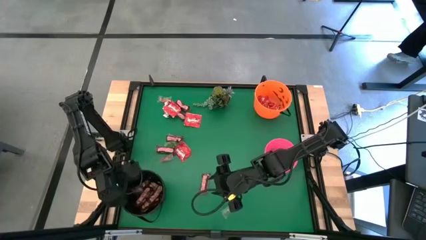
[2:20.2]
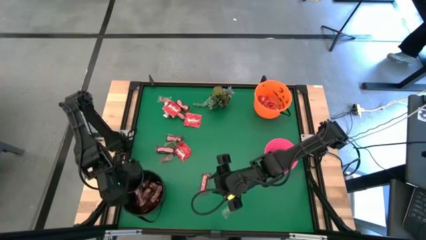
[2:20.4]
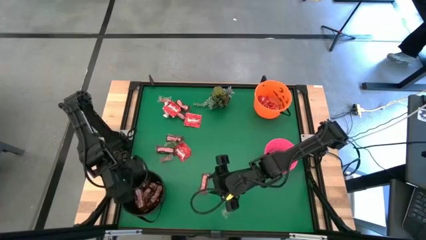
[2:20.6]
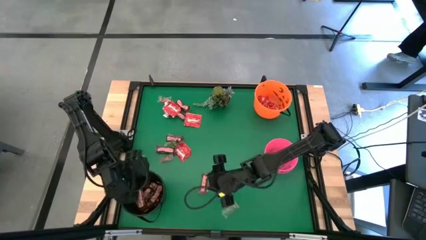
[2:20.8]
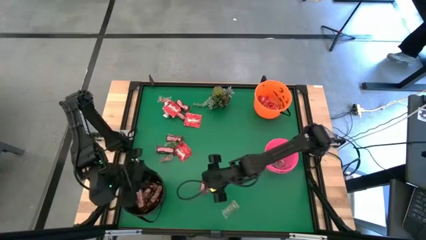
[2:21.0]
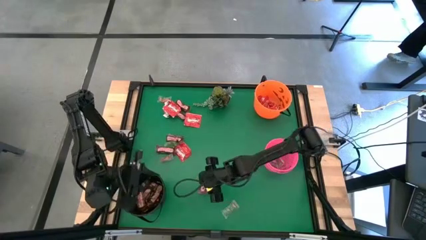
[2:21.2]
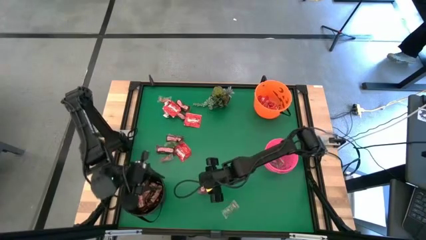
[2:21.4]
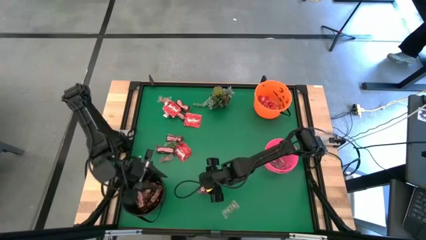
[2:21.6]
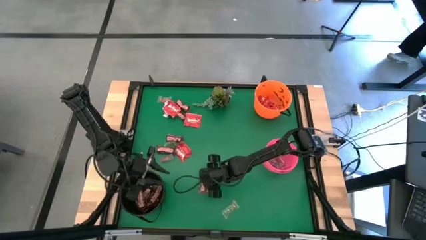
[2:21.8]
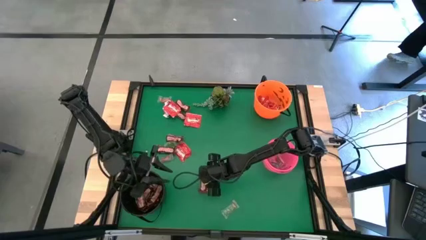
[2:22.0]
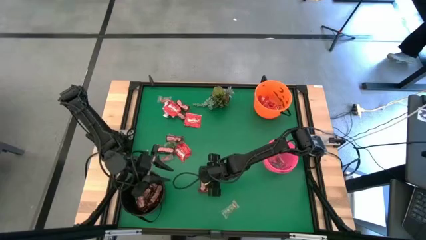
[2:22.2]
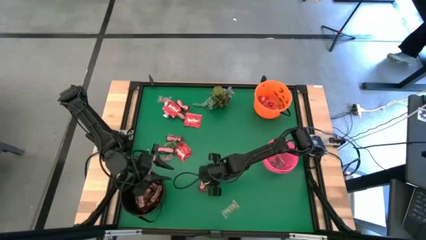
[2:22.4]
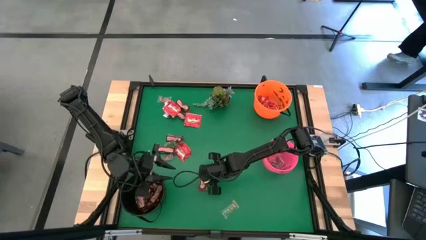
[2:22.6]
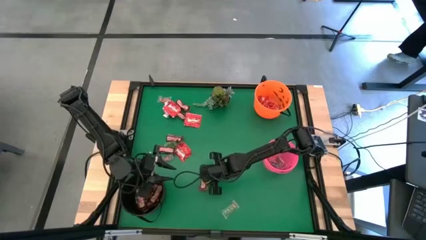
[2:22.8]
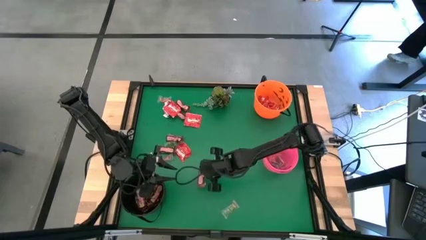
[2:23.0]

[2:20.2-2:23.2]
Task: Sort candy
Put the brown chocolate bar into the black bucket

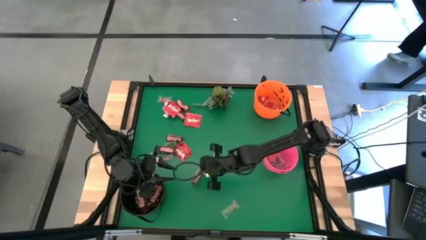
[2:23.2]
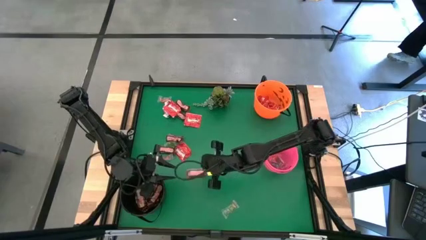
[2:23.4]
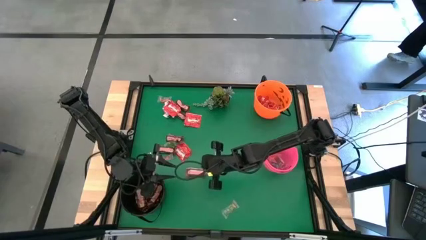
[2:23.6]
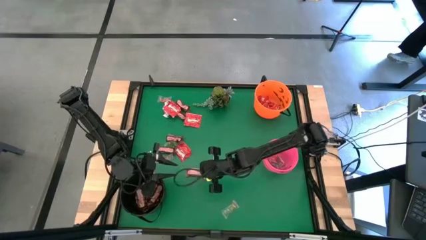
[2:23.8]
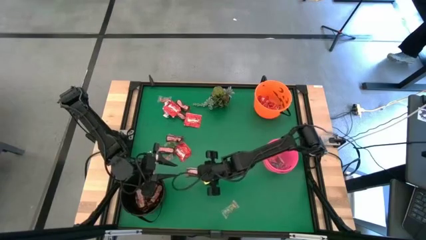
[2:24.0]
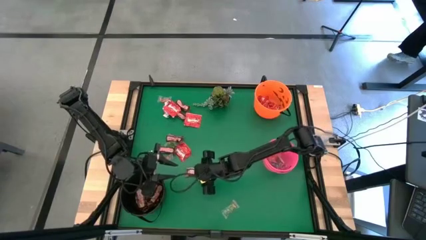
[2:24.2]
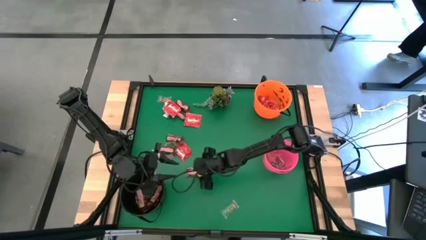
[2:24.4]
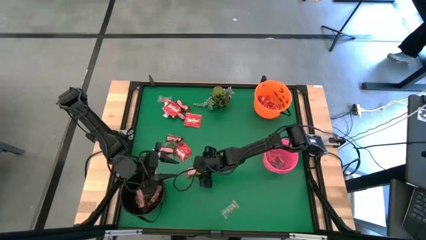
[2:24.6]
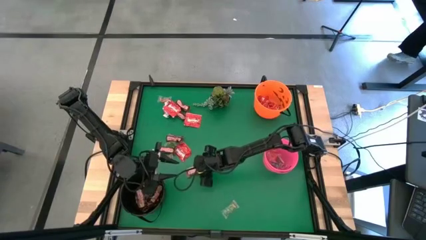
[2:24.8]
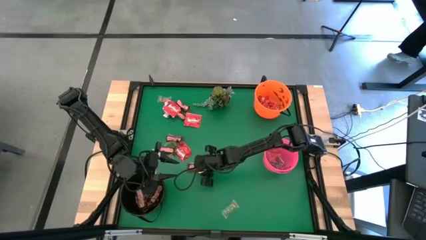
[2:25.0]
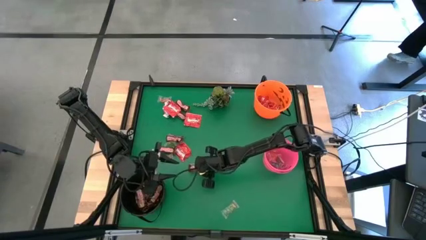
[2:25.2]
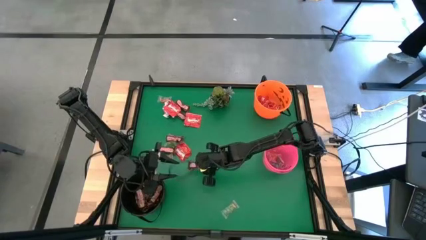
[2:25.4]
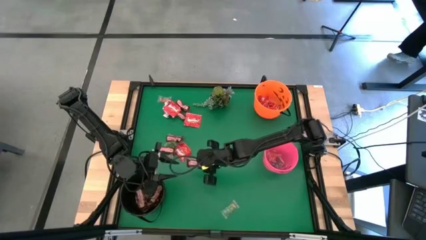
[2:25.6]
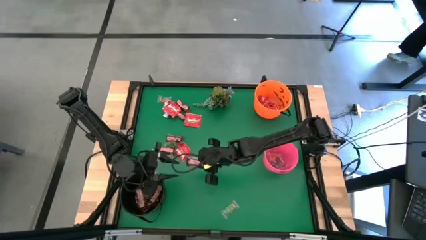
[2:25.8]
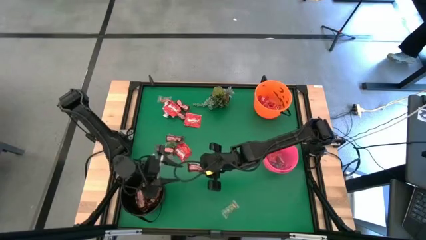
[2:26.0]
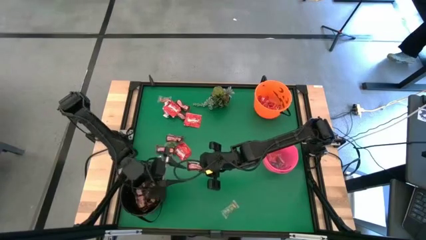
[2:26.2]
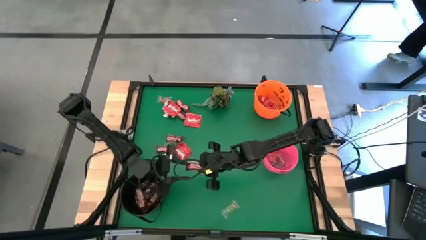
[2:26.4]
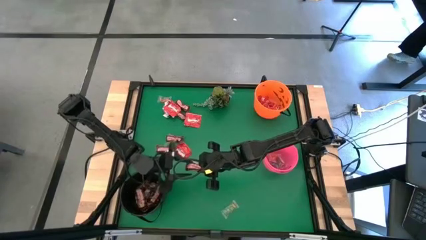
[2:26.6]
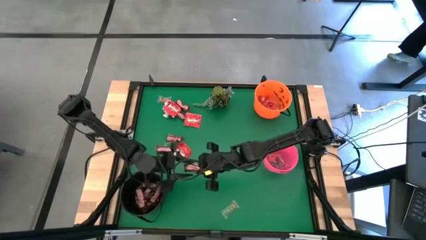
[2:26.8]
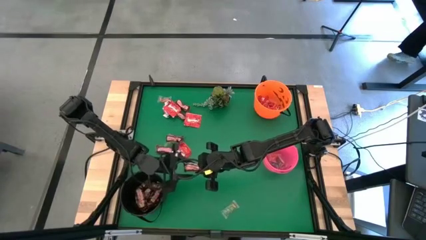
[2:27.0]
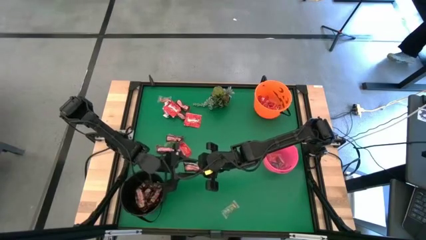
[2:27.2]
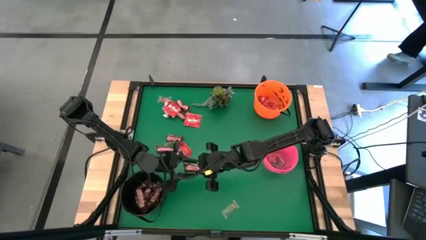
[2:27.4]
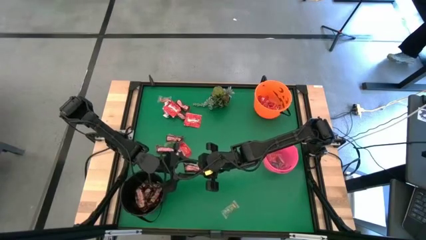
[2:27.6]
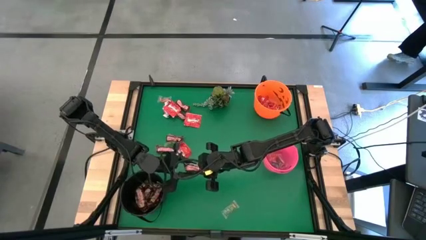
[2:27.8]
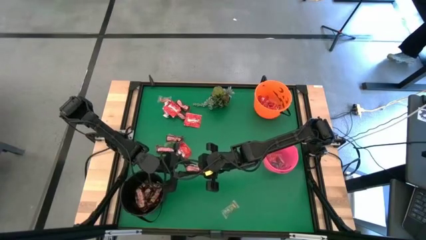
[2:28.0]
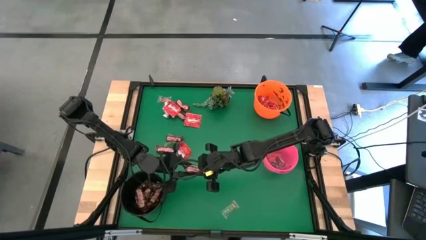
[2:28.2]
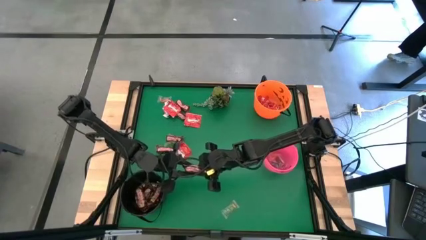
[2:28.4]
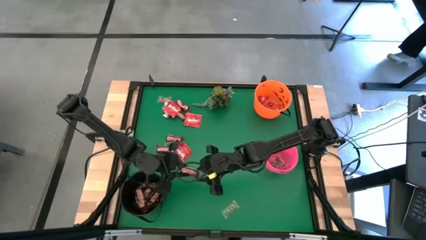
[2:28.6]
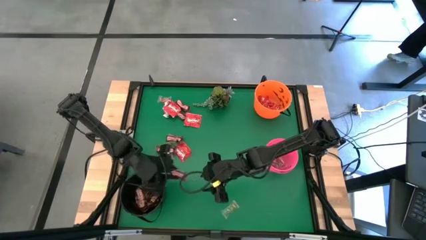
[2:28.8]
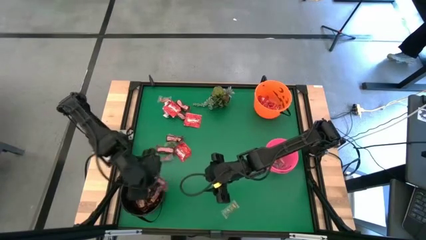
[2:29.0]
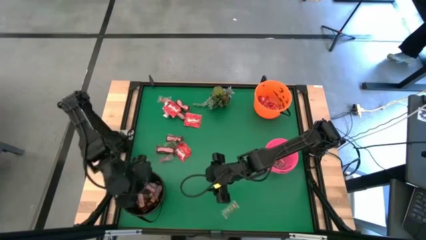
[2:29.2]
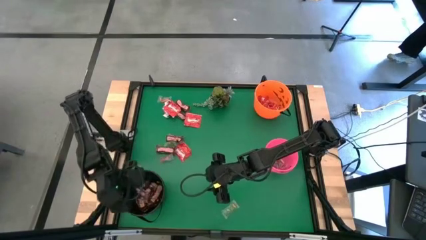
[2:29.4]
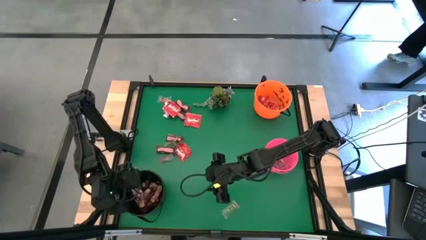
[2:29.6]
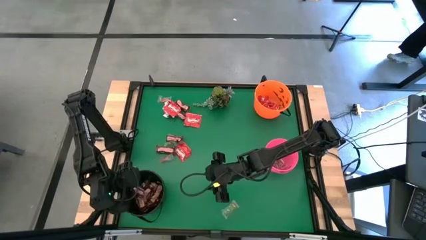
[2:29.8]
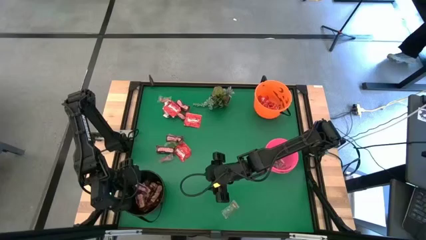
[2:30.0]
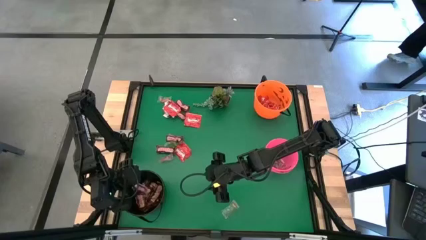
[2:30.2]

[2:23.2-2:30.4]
Put the brown chocolate bar into the black bucket

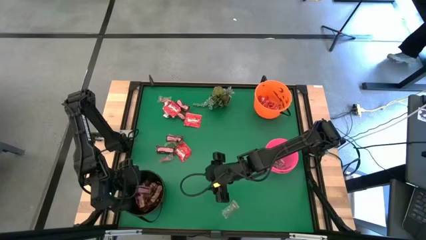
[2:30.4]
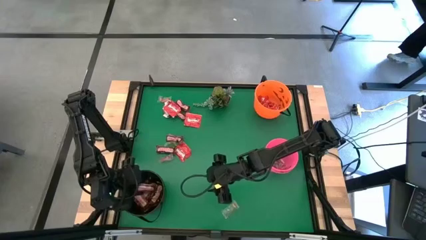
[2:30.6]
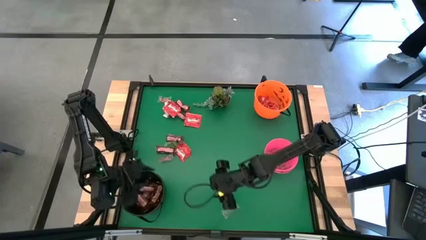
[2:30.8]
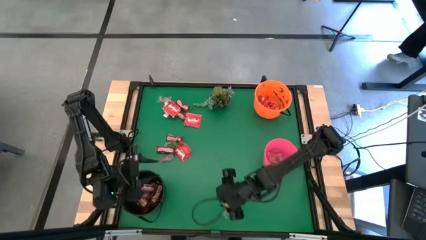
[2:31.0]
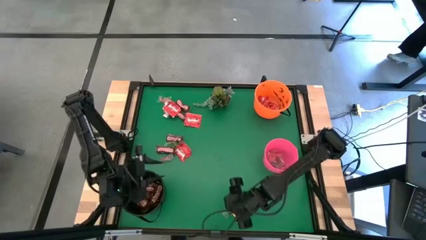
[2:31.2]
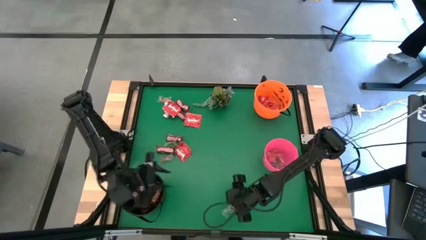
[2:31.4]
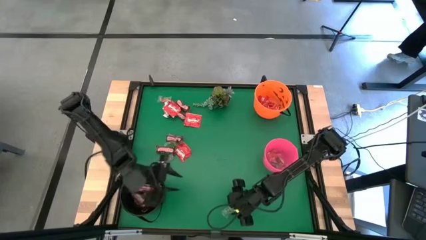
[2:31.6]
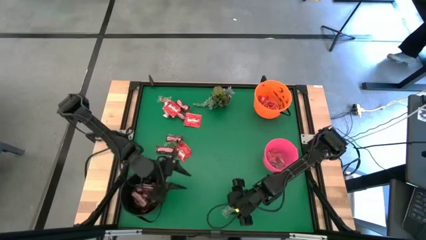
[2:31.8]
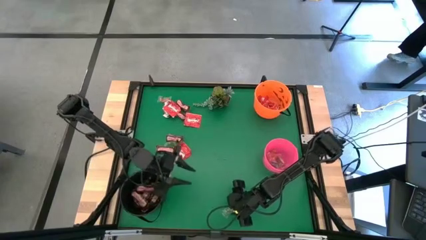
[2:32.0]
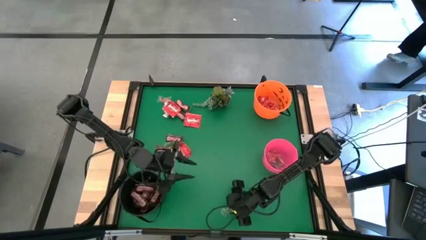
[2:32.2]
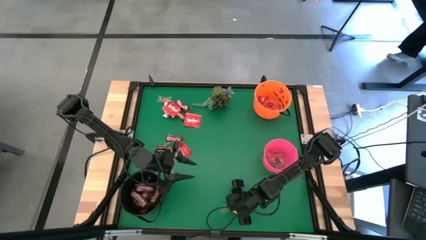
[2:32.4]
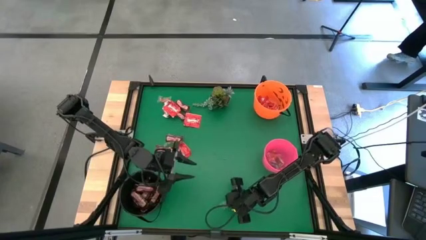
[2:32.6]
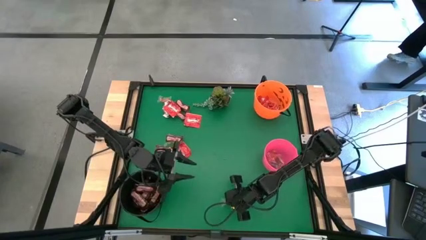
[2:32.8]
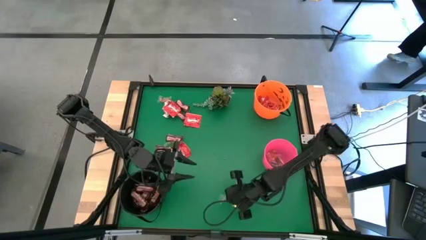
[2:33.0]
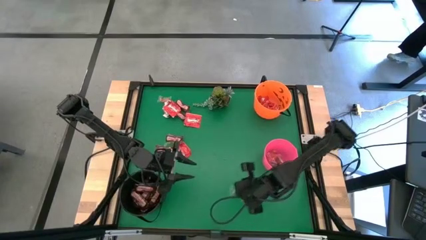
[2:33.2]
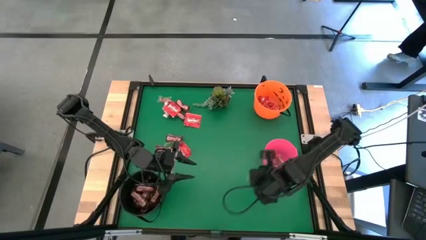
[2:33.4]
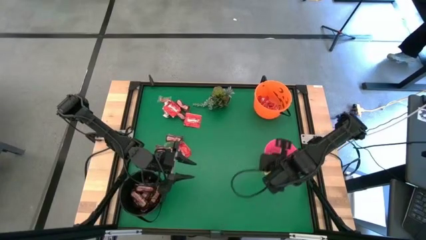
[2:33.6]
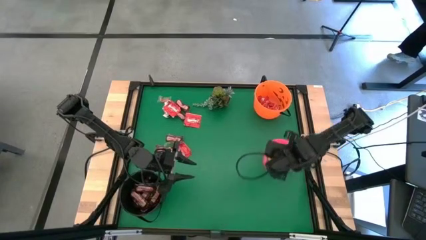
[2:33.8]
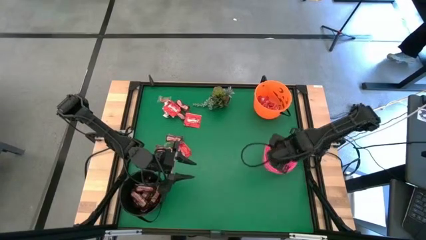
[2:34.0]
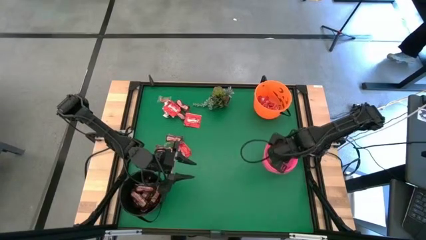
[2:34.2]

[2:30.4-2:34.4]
Put the green candy into the pink bucket

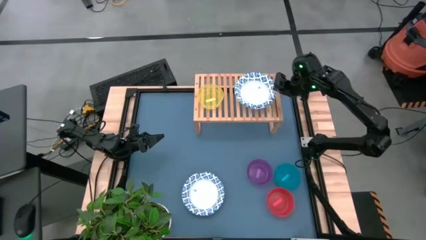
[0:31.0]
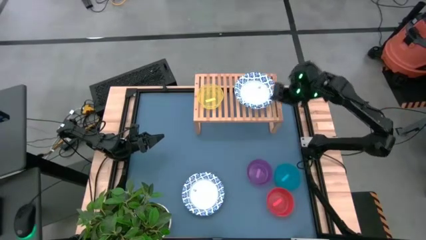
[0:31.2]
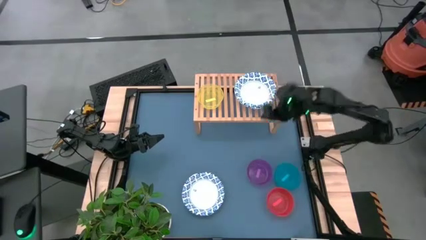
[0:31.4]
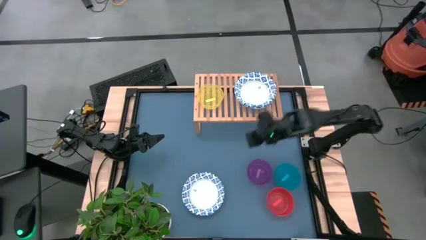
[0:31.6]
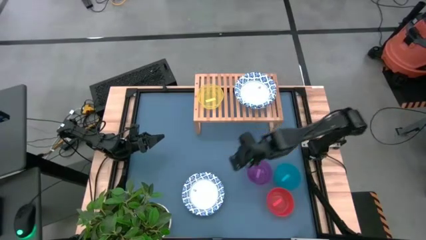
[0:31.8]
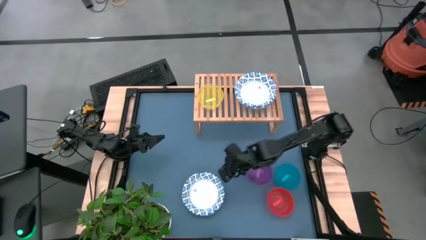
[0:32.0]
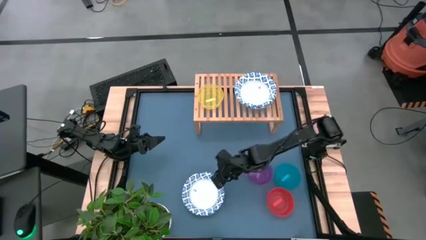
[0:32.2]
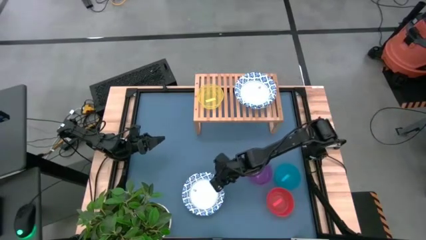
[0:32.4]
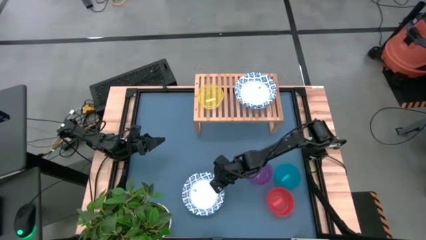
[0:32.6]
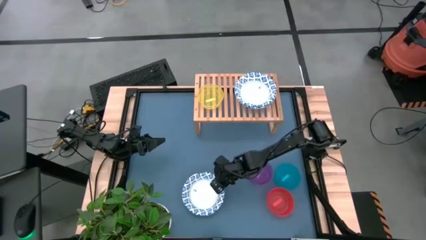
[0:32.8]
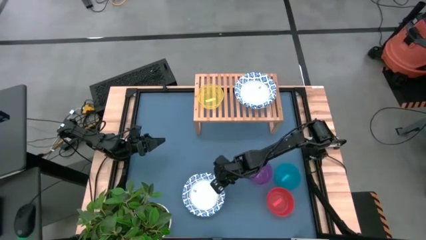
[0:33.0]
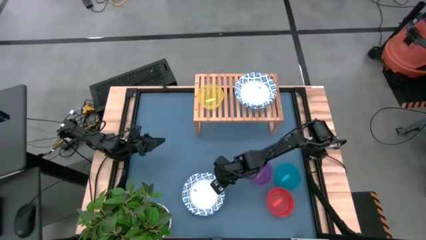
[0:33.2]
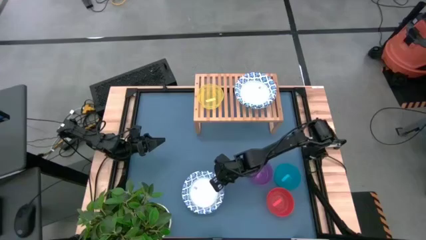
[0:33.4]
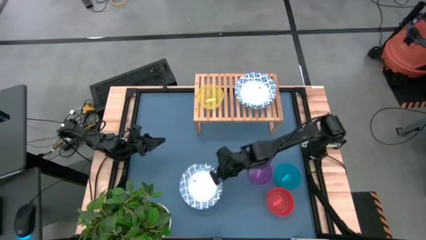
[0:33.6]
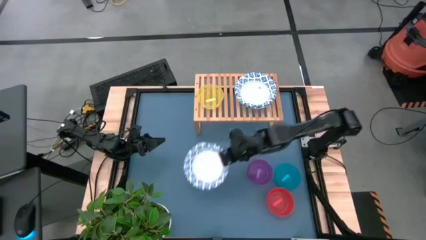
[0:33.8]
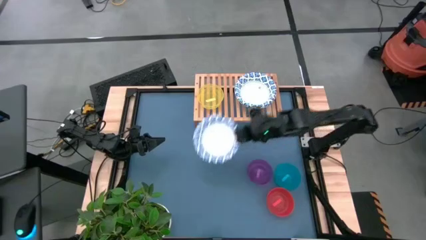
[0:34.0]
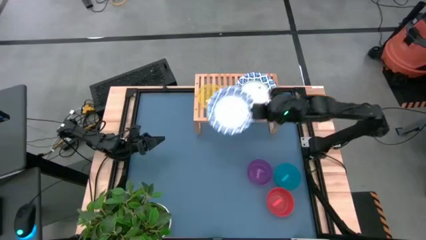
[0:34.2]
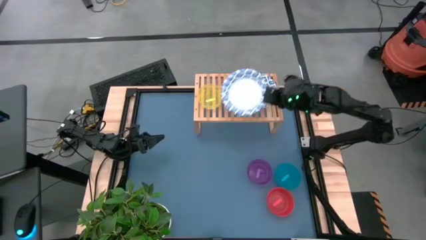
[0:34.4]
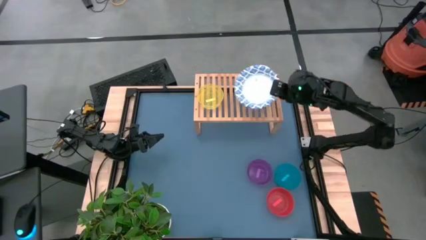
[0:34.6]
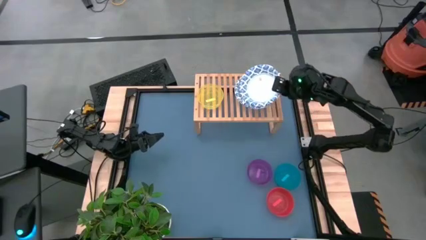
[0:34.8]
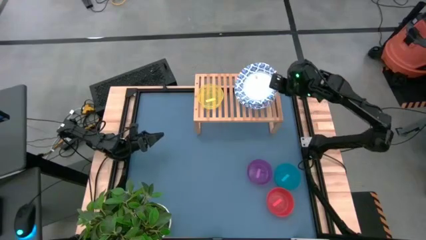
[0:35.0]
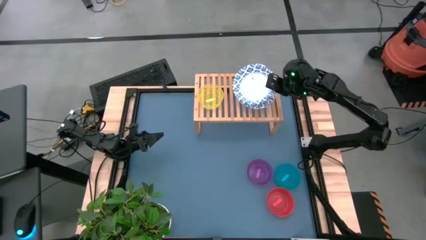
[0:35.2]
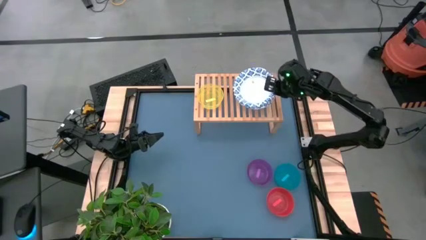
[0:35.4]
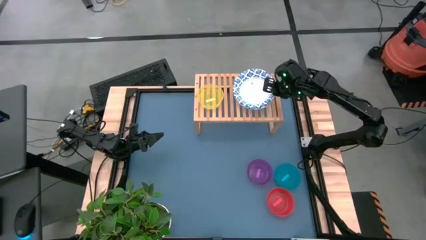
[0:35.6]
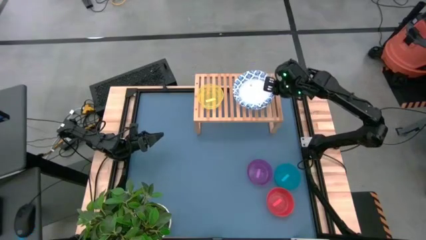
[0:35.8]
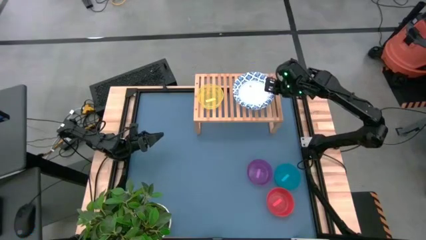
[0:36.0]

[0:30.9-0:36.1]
Task: Place and stack bowls onto a shelf
Stack the white bowl on top of the white bowl on the shelf
